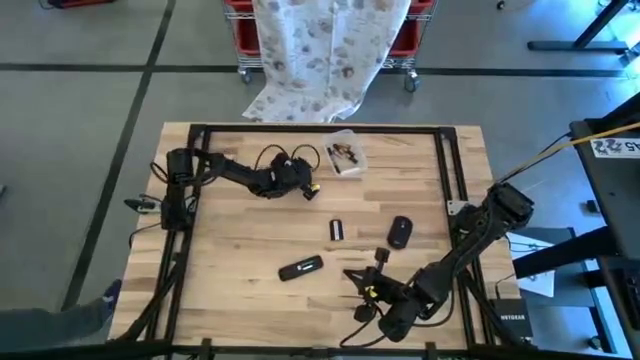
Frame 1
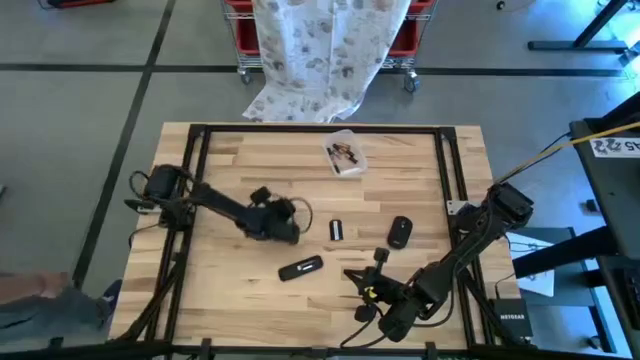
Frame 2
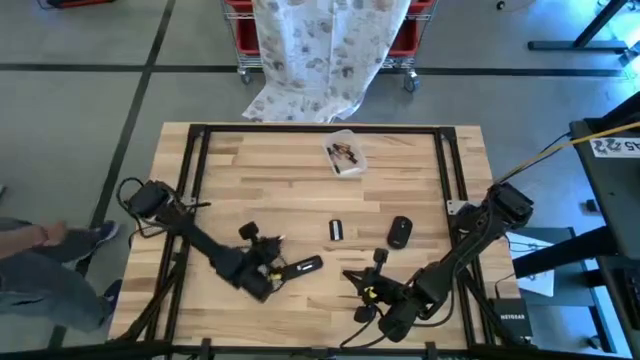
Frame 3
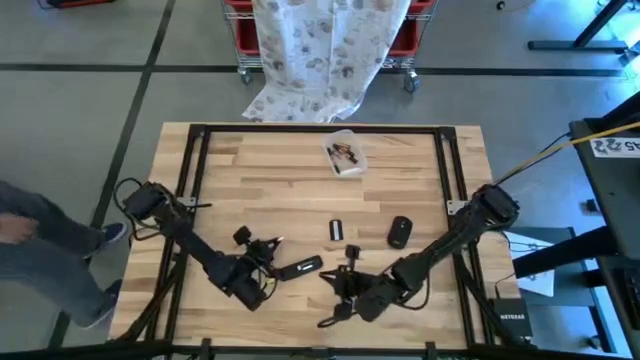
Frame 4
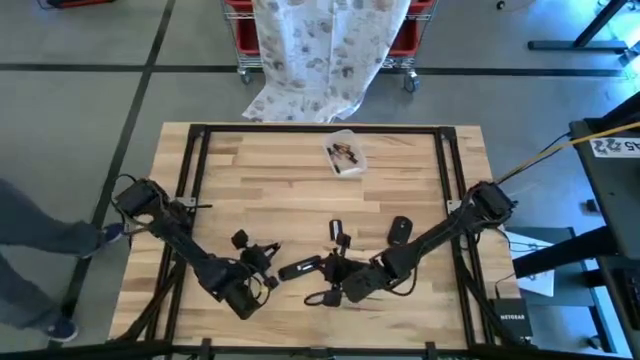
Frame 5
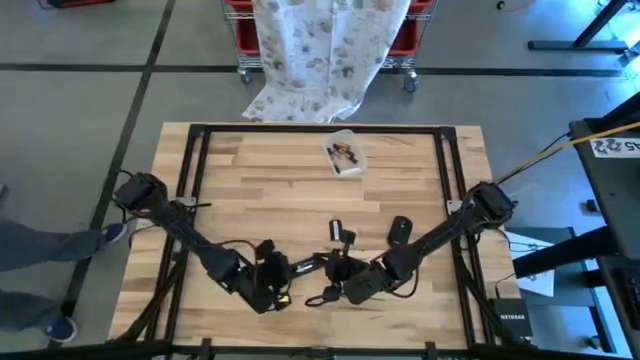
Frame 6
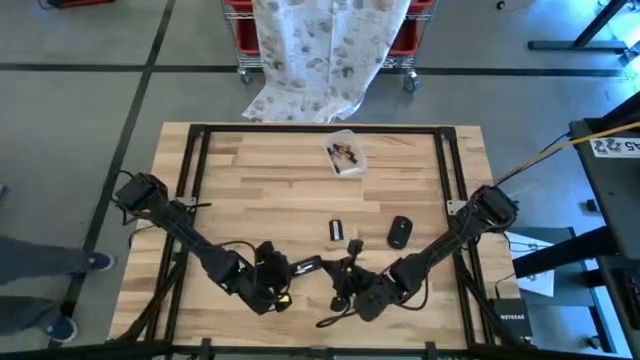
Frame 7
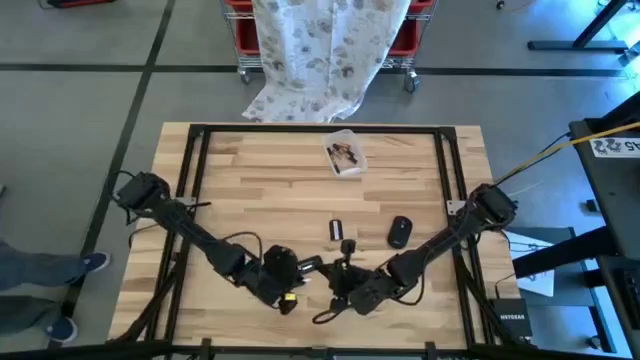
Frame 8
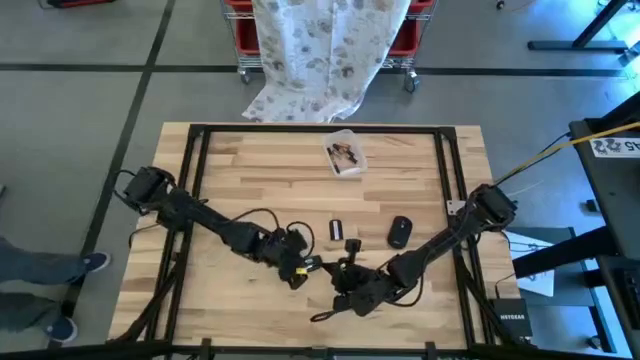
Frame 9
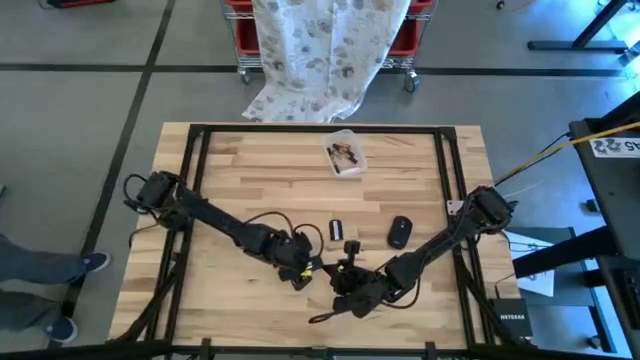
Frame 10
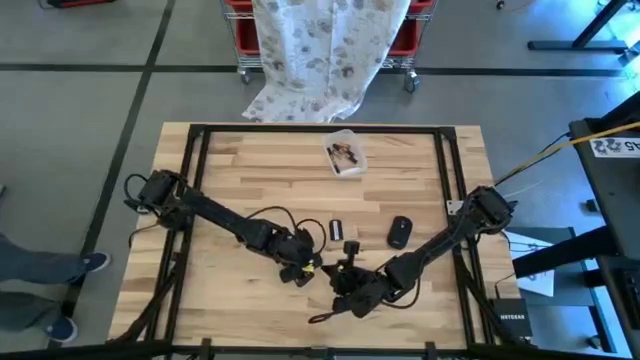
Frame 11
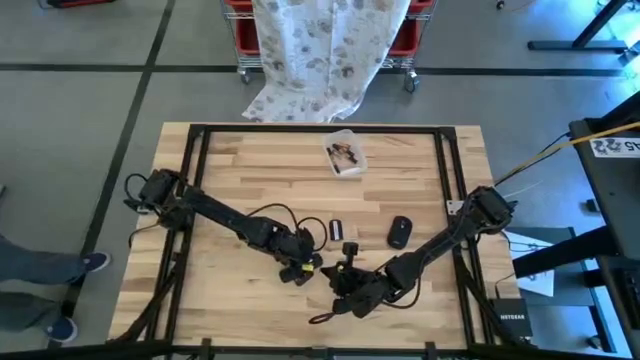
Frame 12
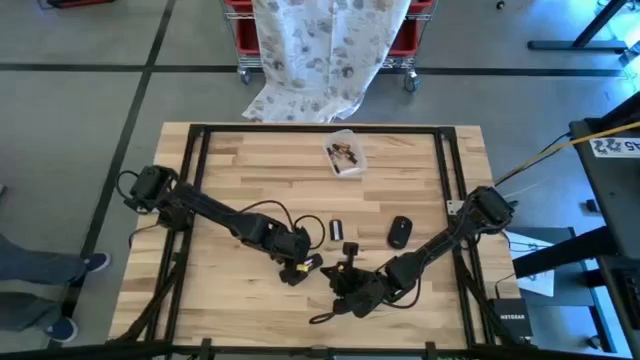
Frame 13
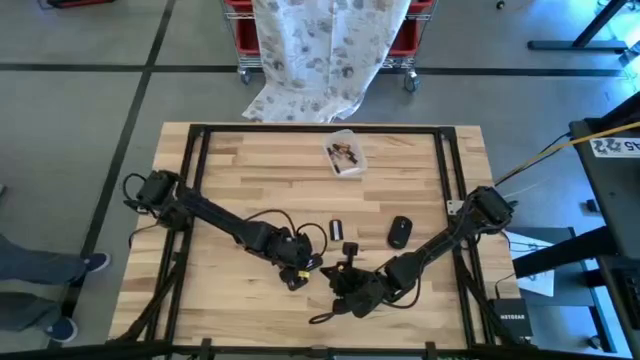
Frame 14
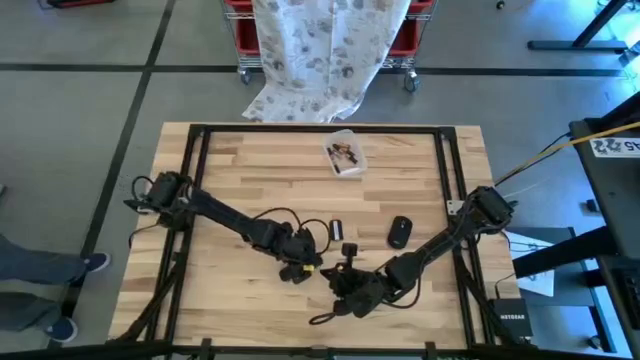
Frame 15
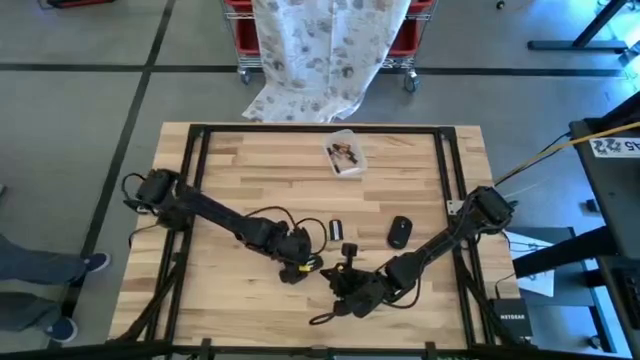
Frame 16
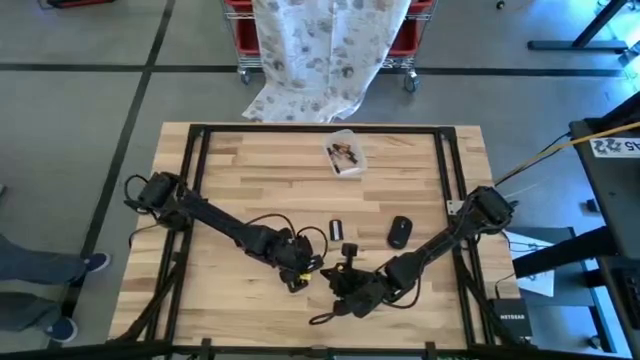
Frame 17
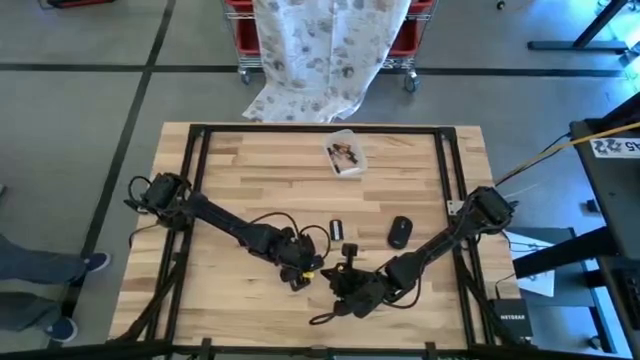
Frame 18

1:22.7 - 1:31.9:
Task: Insert battery
Insert the white battery into the remote control

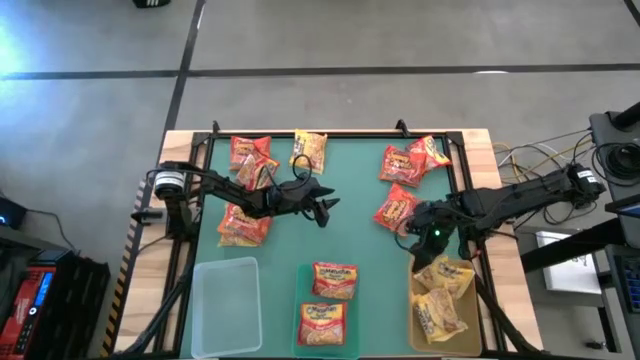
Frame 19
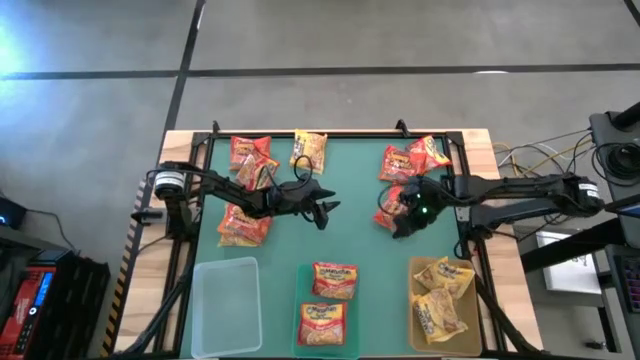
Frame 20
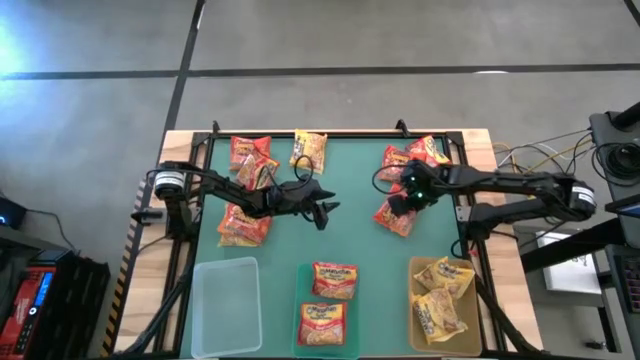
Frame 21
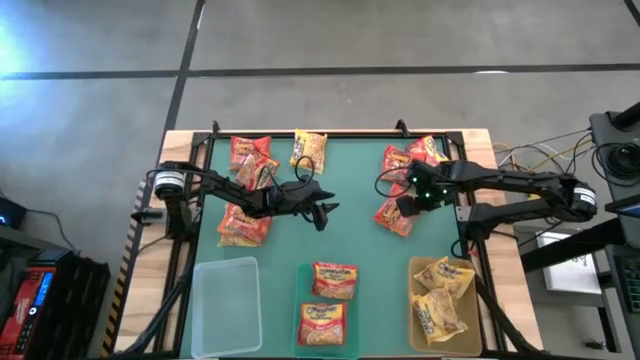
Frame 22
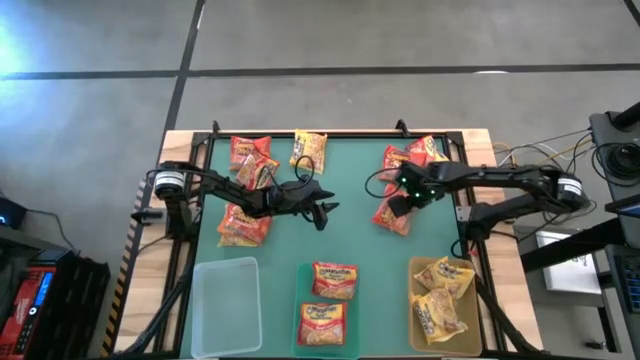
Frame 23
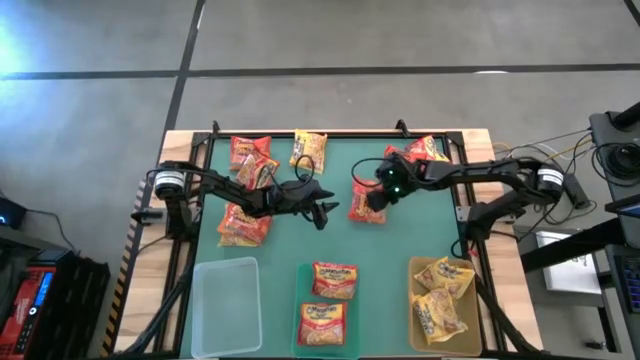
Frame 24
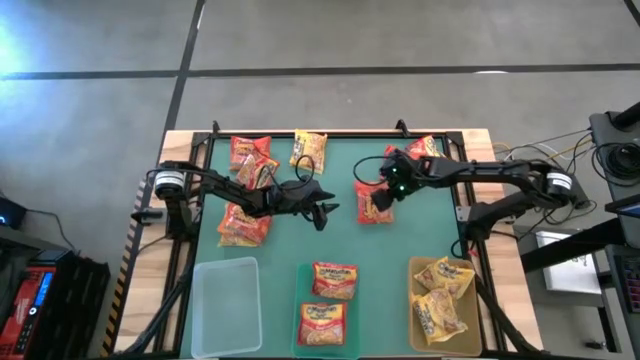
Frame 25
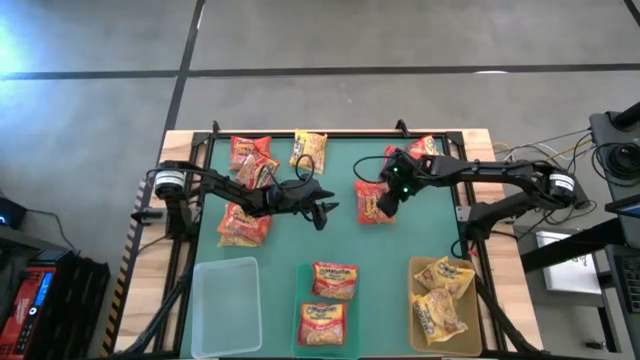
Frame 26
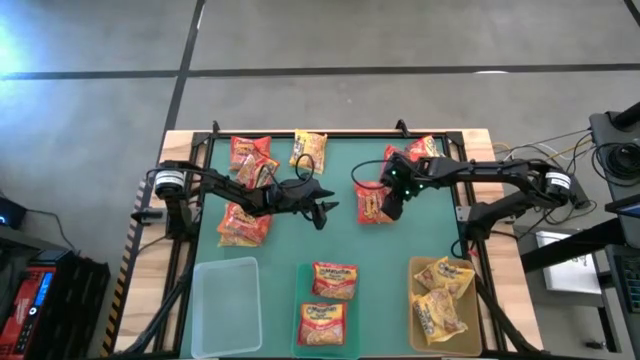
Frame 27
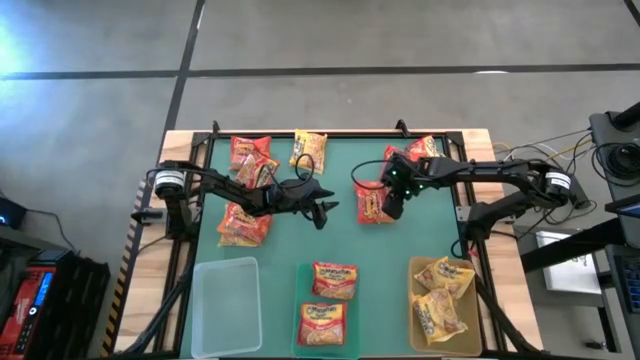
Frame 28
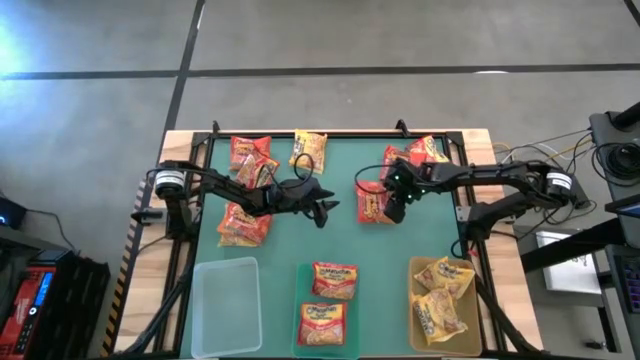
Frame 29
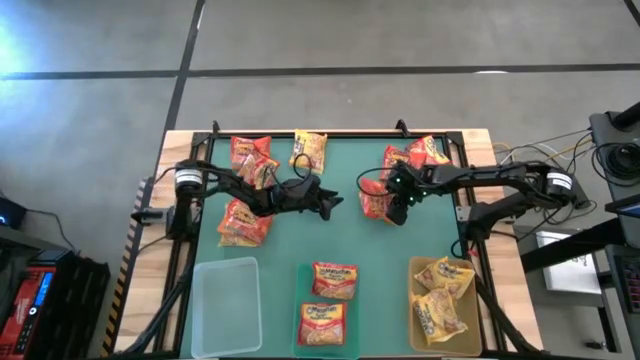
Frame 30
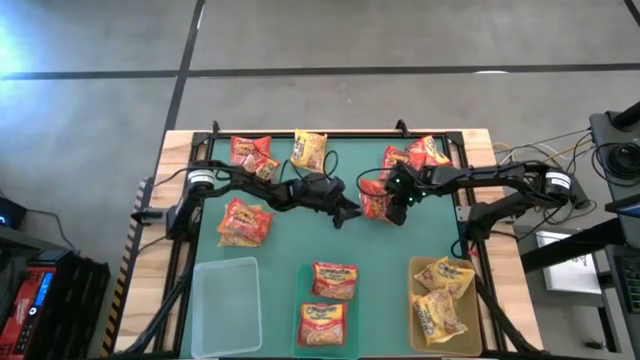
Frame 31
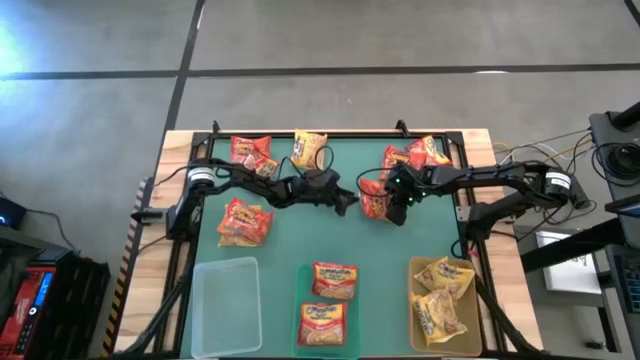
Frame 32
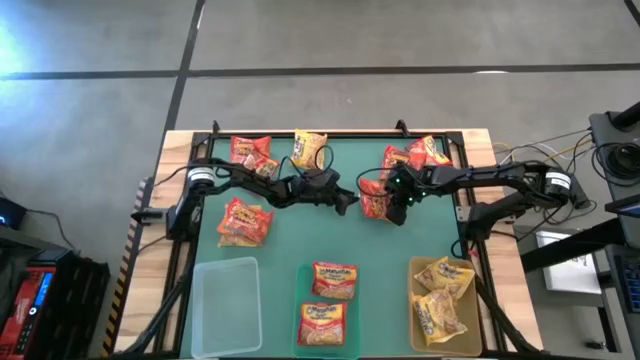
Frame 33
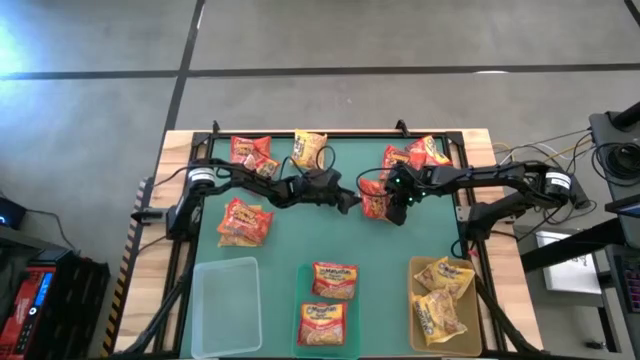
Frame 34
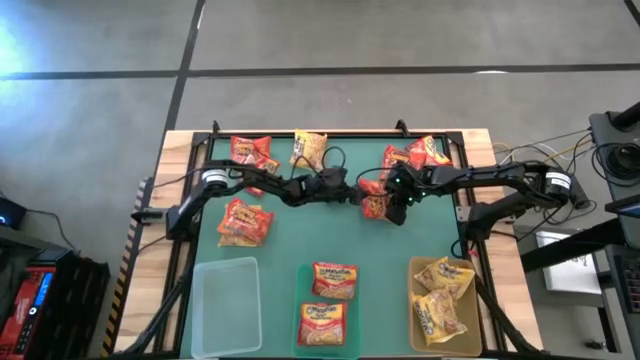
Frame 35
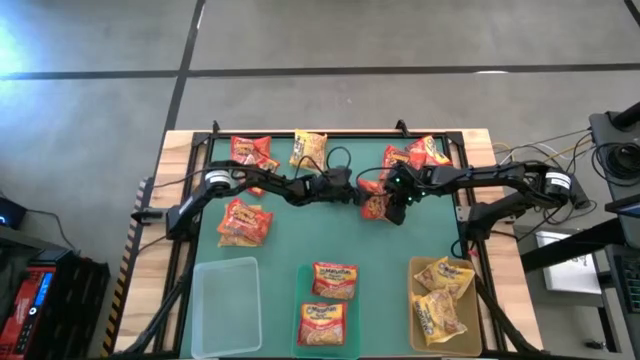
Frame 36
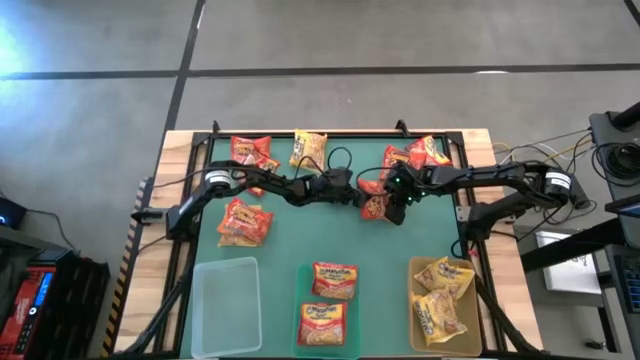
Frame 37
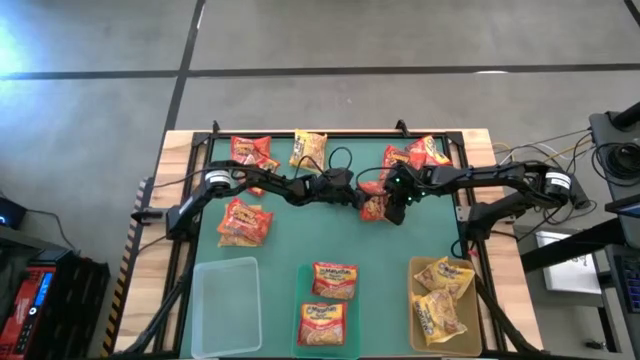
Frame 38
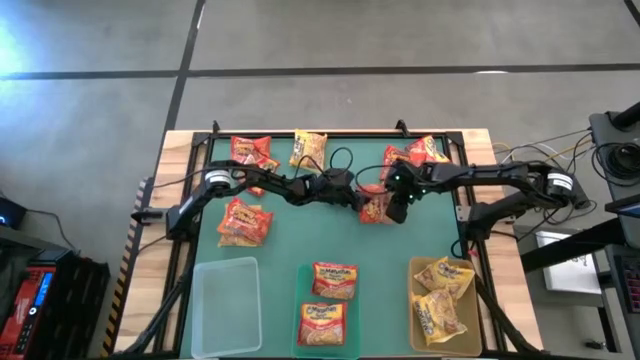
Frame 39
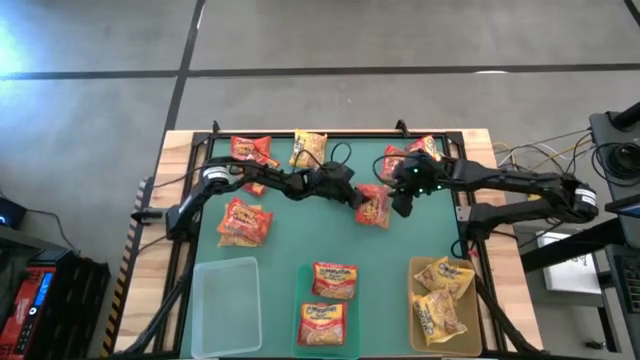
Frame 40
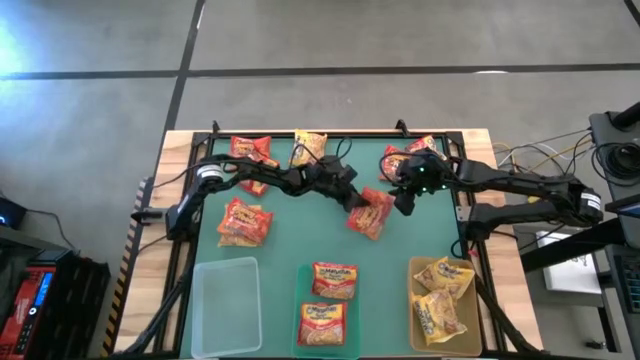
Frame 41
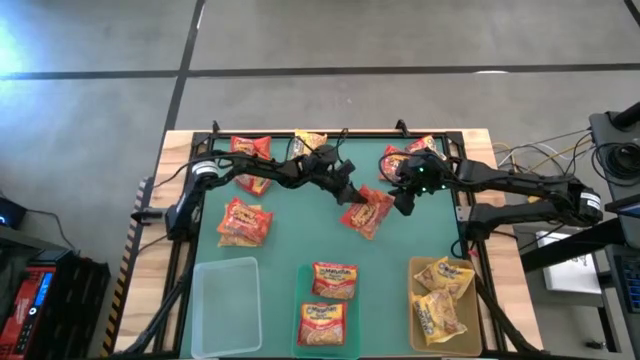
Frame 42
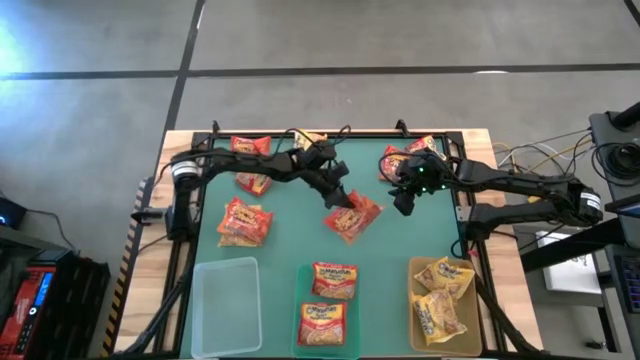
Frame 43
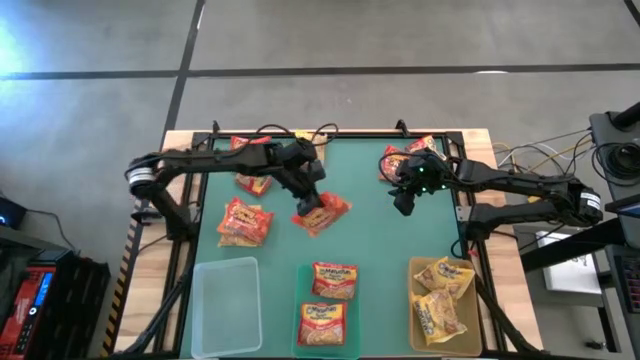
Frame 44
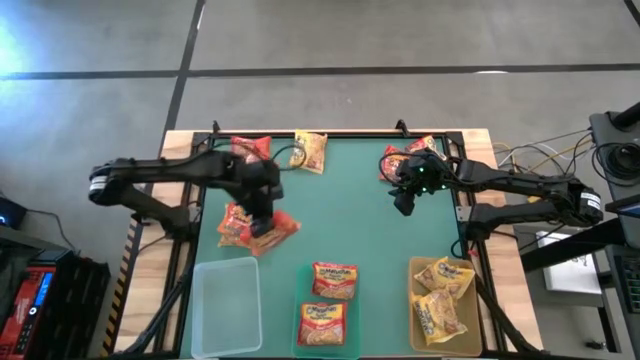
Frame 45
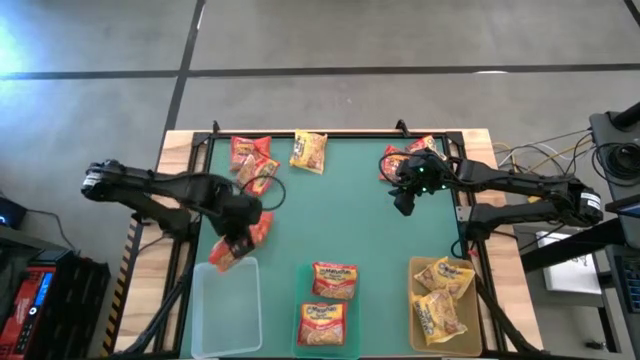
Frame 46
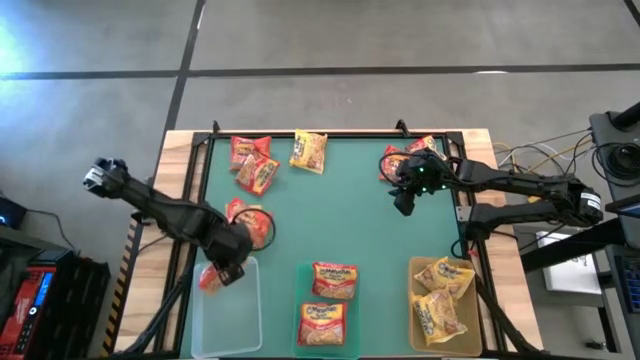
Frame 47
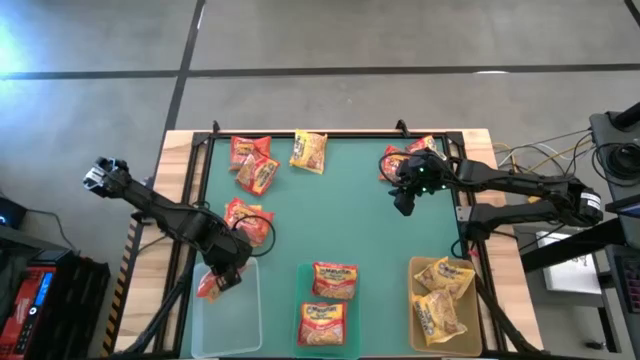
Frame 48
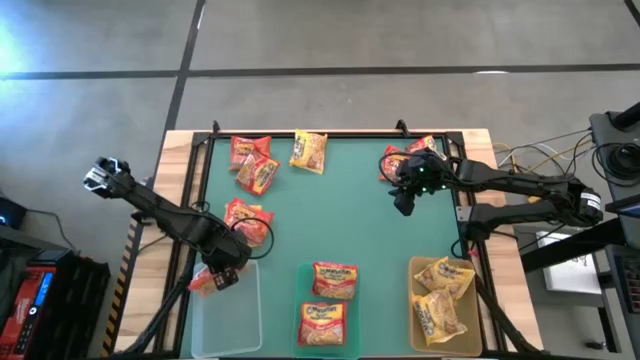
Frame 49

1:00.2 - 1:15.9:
Task: Sort Maruchan noodles
Put the orange noodle pack into the transparent bin
